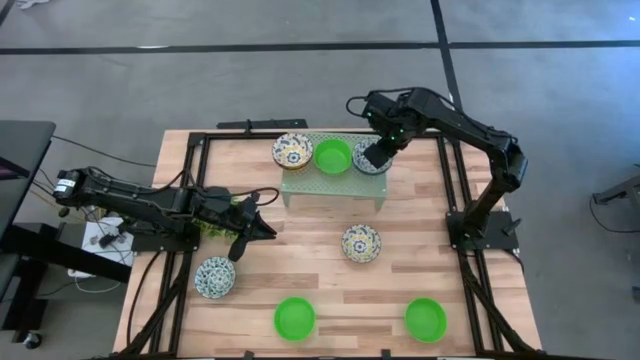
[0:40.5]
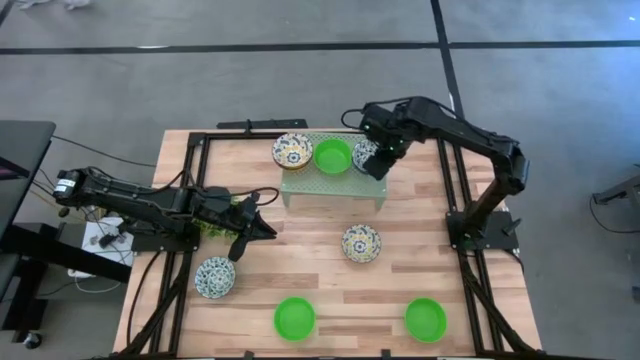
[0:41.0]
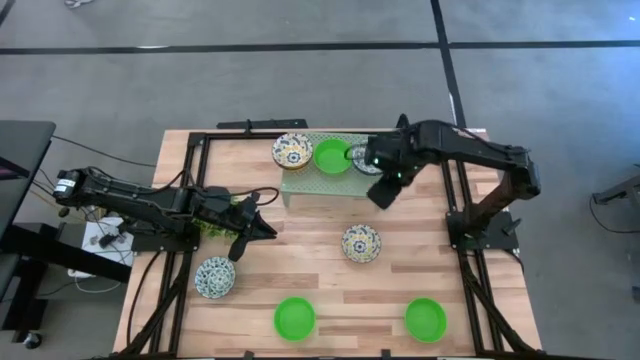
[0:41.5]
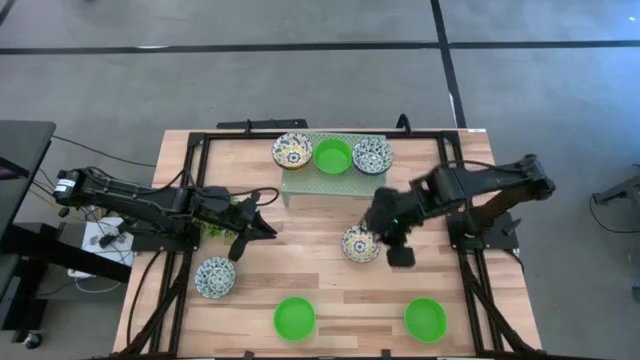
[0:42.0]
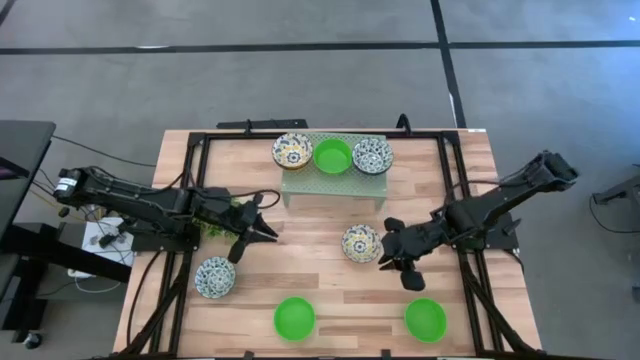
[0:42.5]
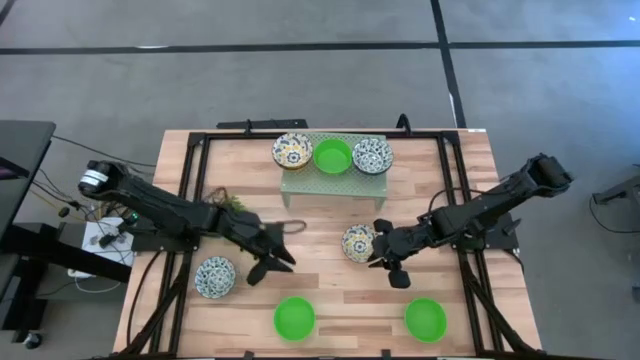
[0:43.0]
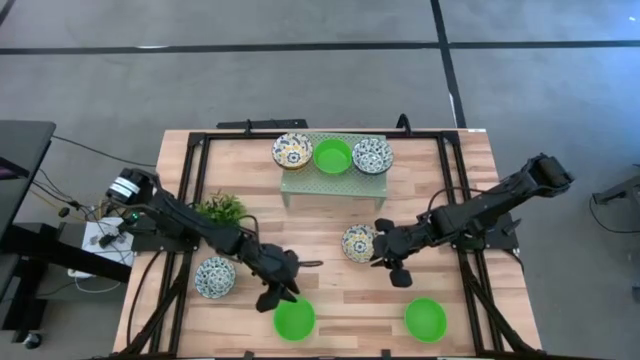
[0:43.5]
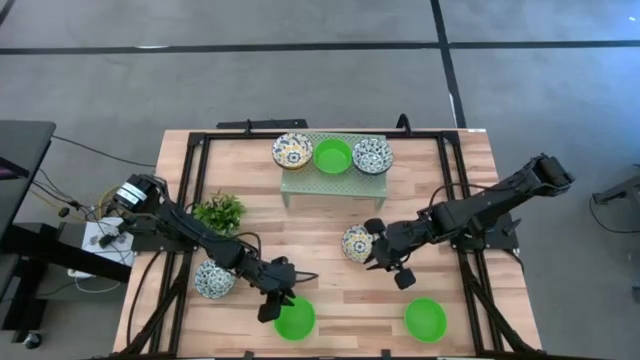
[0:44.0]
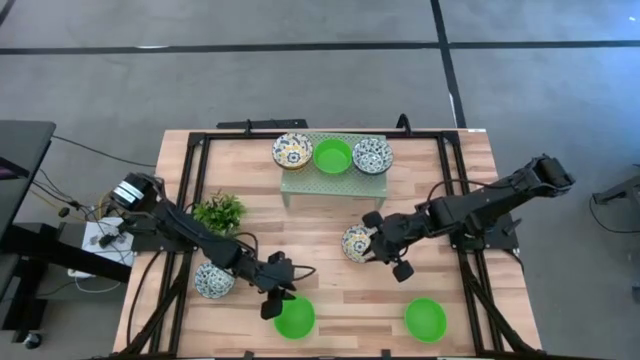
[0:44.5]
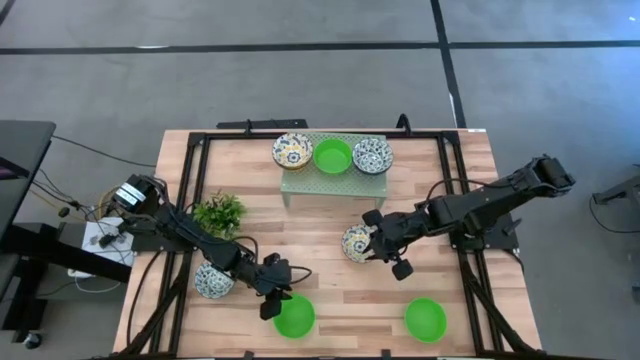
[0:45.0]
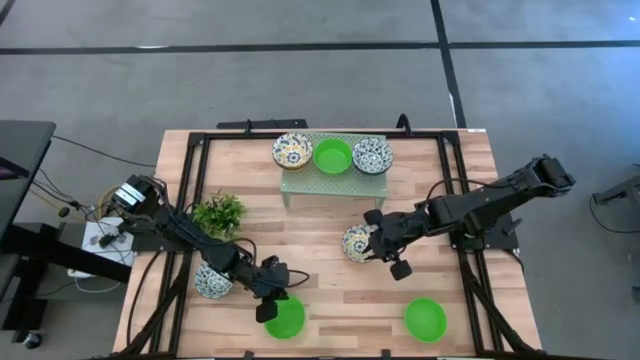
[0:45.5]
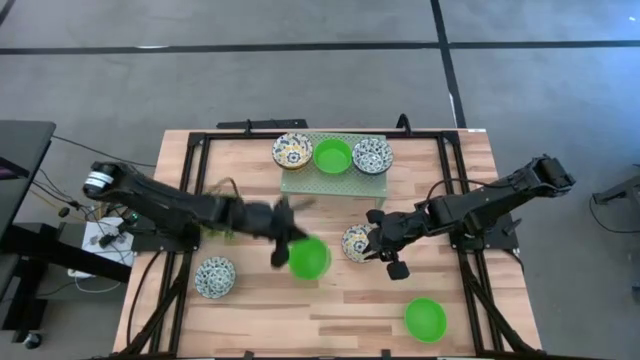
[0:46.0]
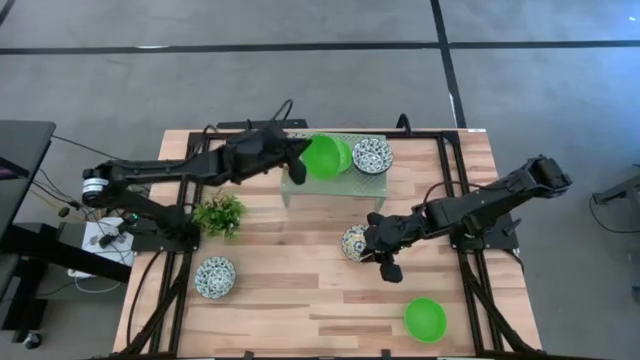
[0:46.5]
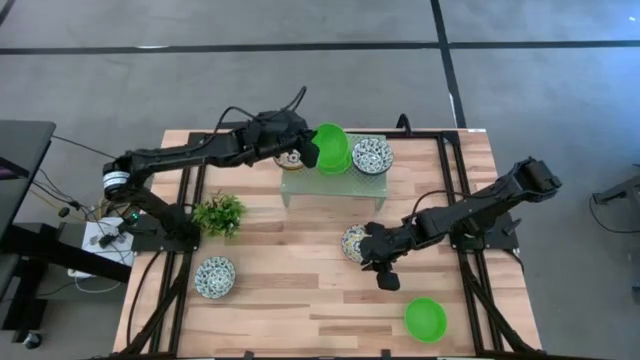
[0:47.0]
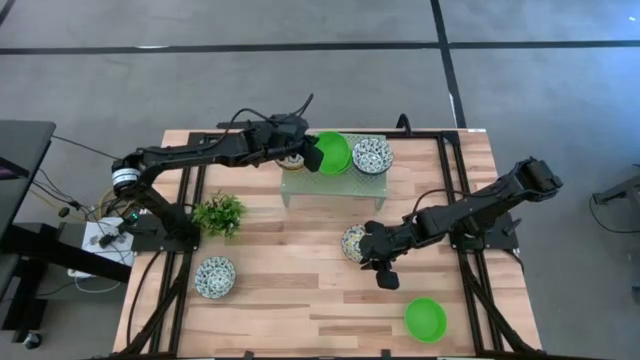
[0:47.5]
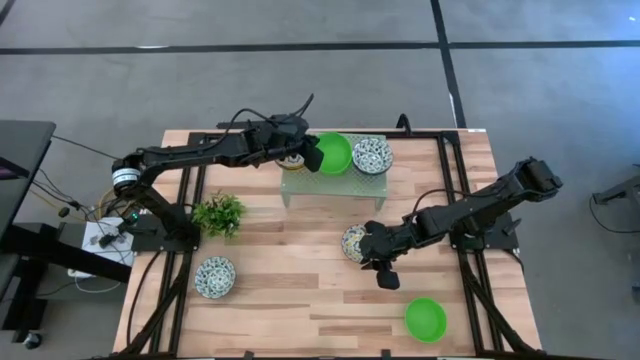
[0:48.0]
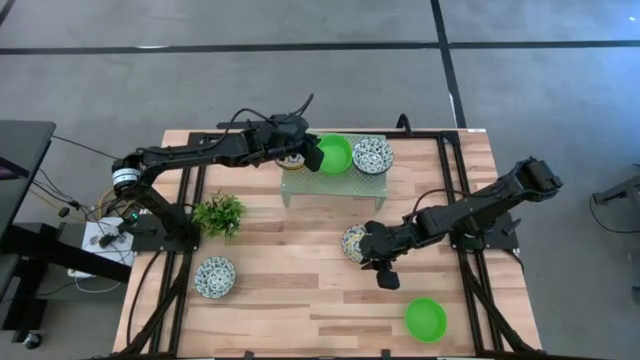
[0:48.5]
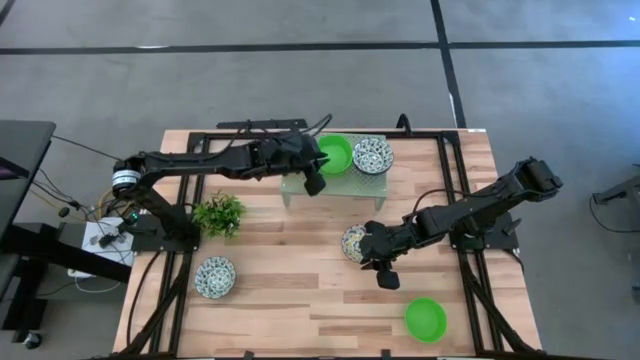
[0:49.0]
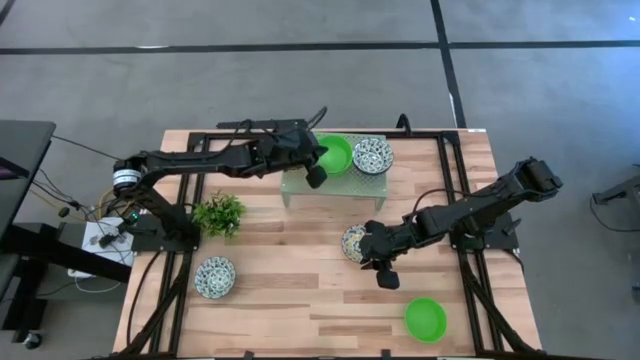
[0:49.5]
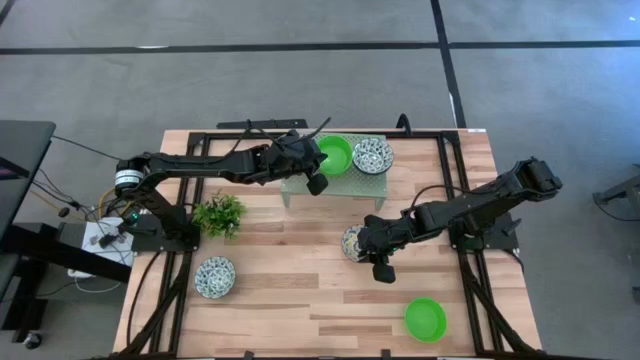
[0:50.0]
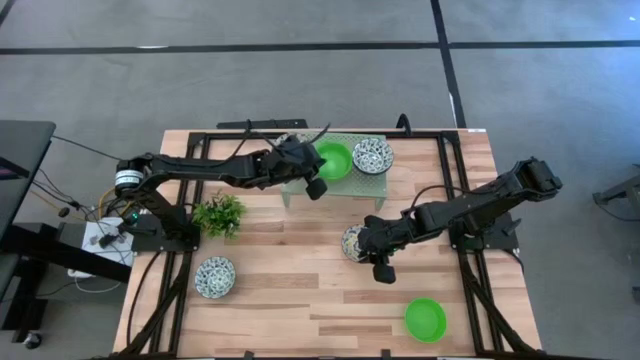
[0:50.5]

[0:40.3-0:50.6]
Task: Pick & Place Mini bowls
Stack the left green bowl on the green bowl on the shelf

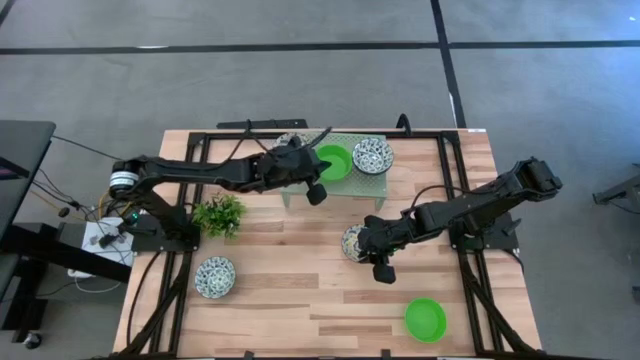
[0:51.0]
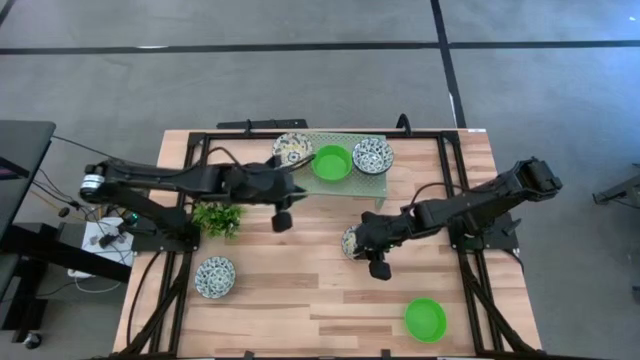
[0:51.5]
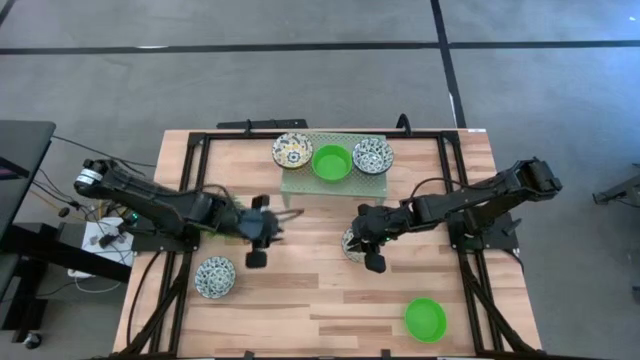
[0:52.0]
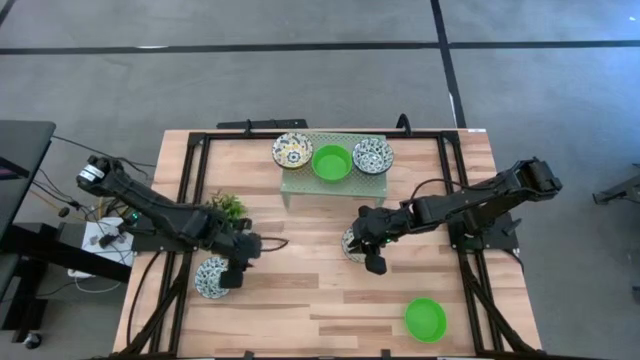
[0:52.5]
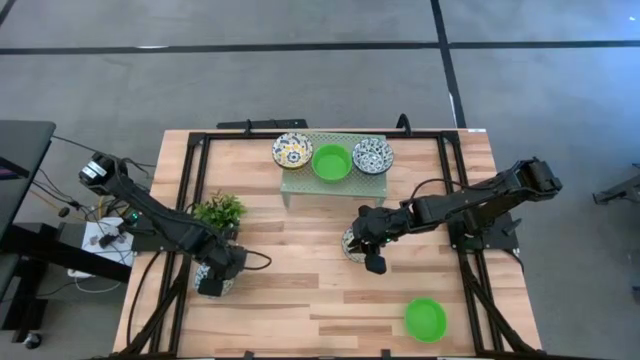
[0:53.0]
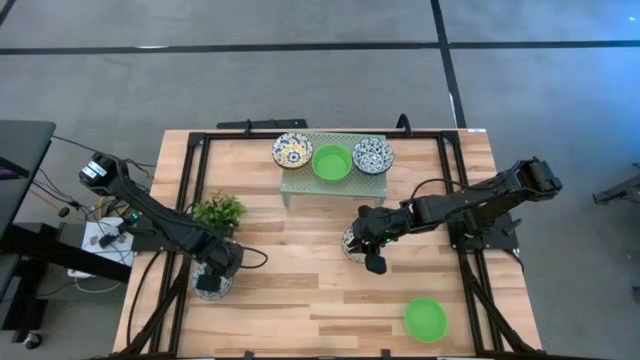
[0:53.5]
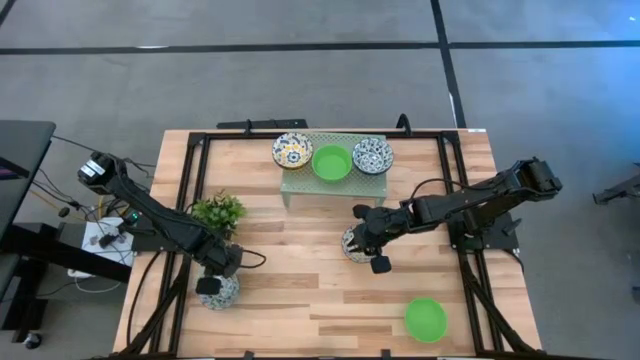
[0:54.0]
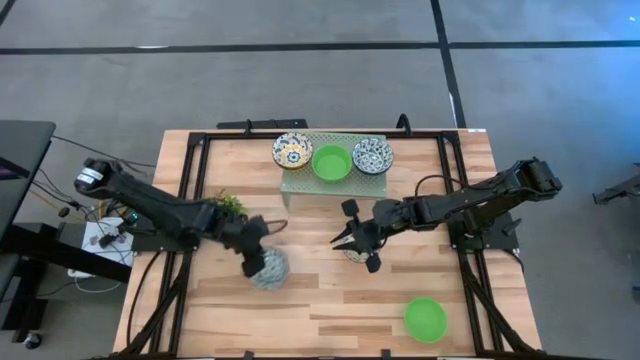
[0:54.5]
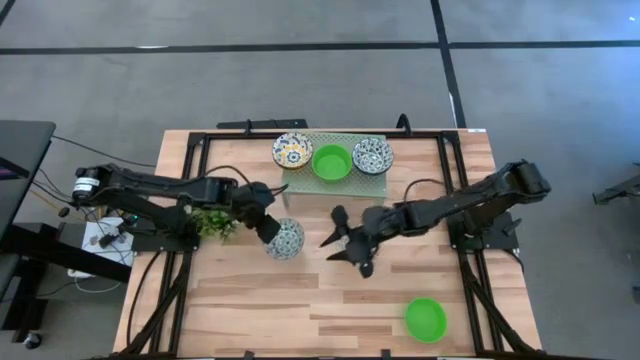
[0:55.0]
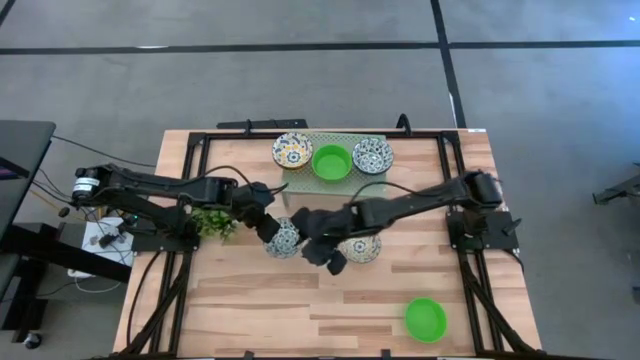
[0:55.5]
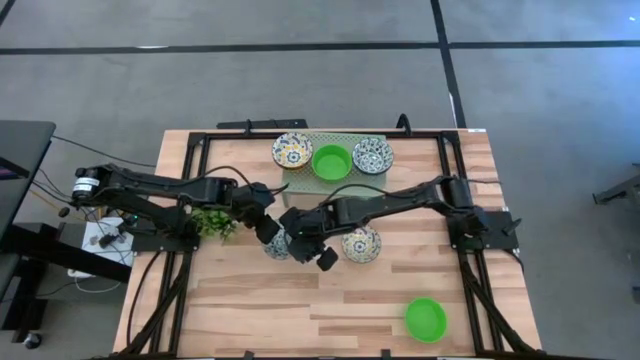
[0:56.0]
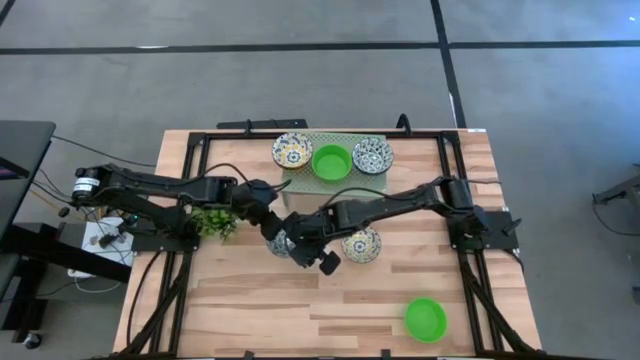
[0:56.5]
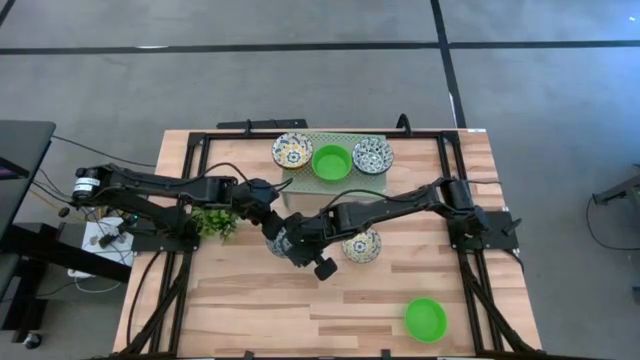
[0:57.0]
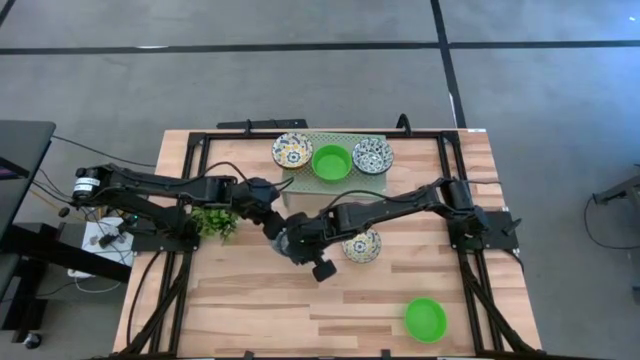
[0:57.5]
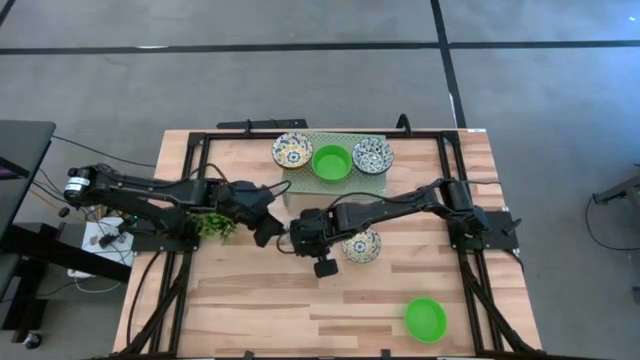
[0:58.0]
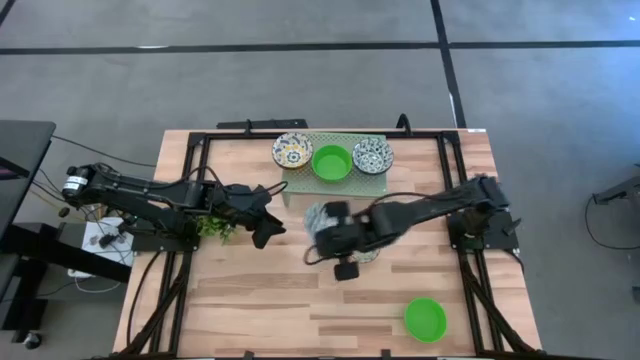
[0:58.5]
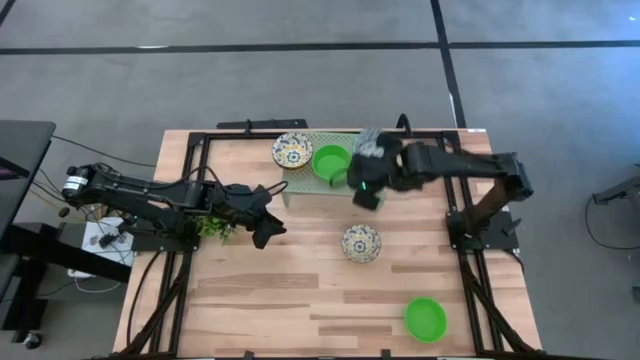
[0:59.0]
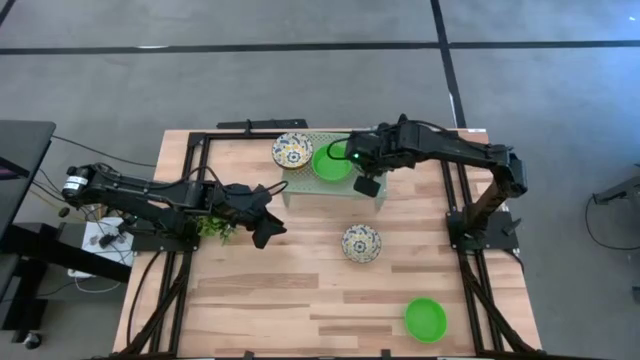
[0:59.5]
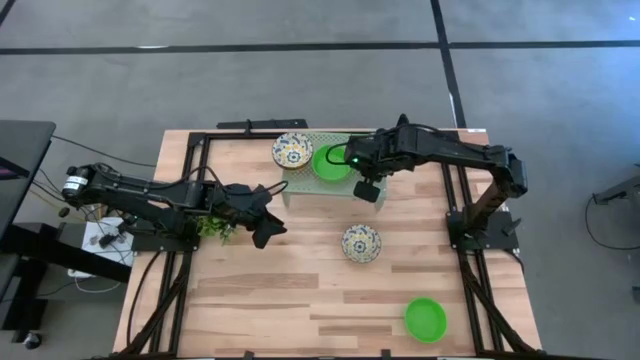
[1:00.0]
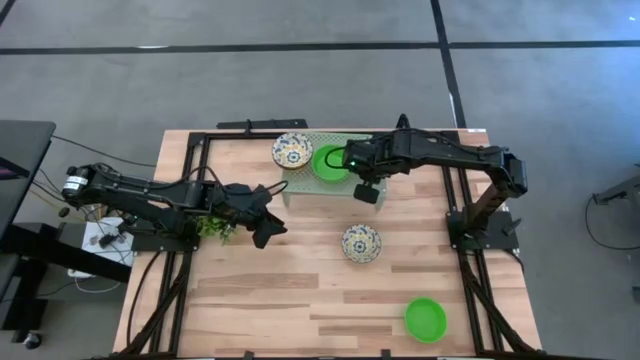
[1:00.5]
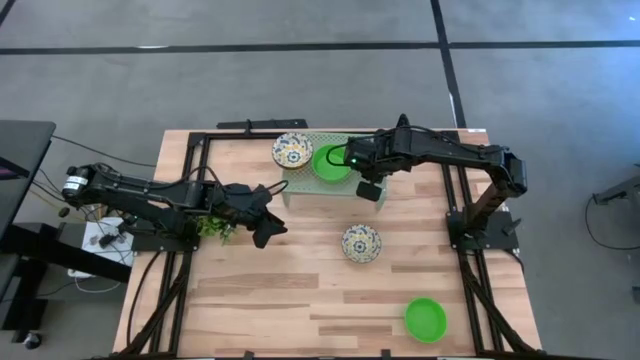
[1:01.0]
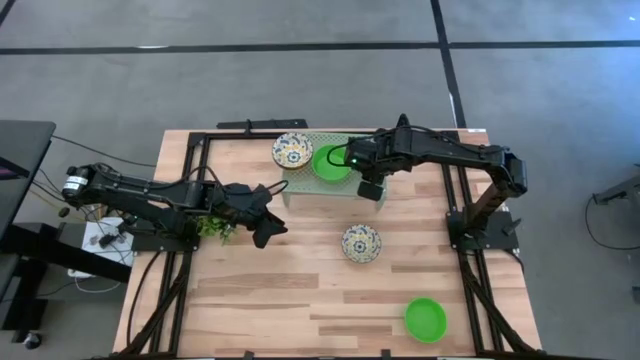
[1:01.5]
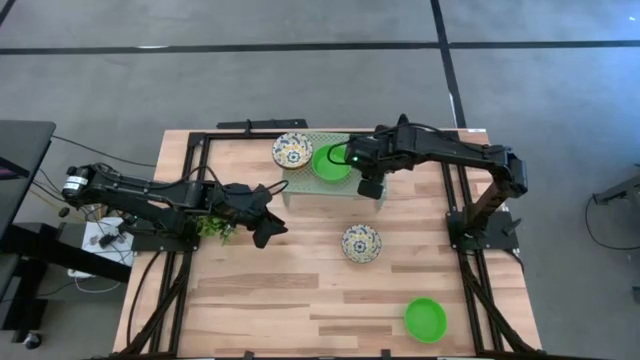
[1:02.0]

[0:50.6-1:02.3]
Stack the blue bowl on the blue bowl on the shelf
